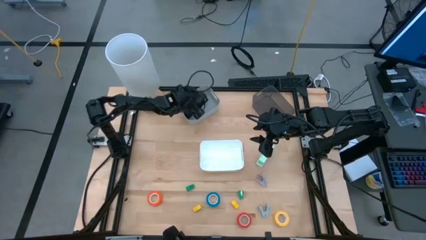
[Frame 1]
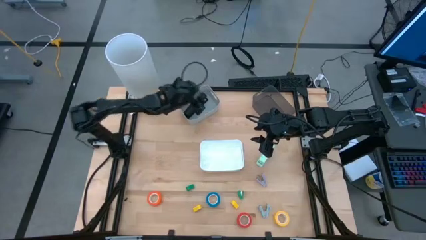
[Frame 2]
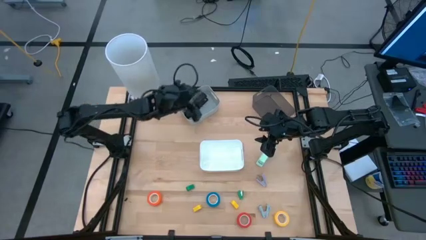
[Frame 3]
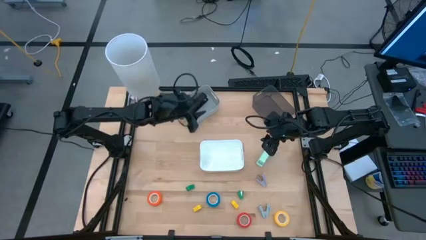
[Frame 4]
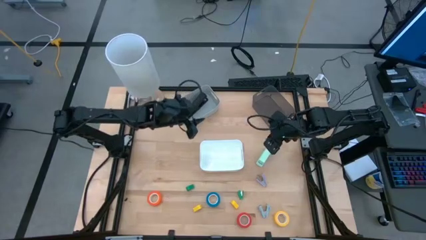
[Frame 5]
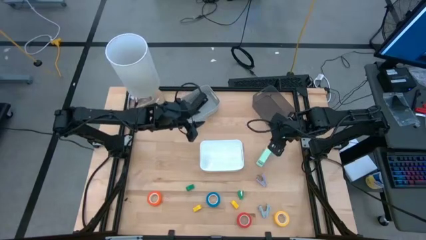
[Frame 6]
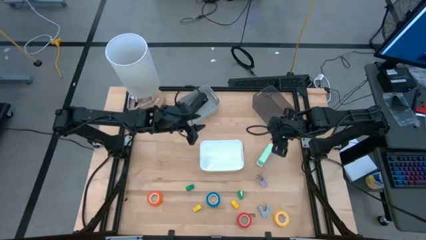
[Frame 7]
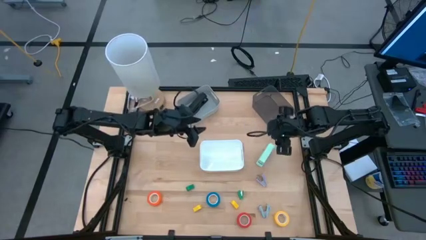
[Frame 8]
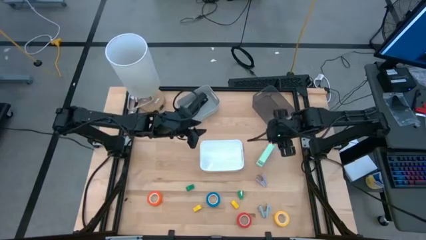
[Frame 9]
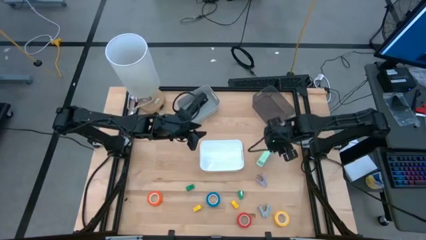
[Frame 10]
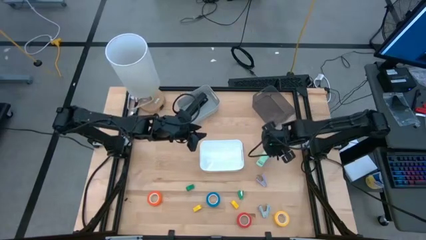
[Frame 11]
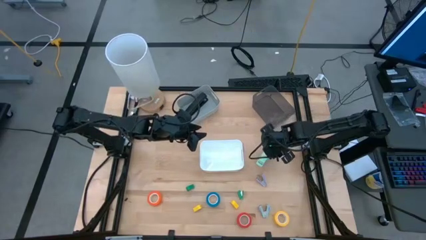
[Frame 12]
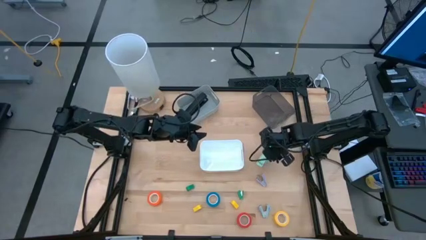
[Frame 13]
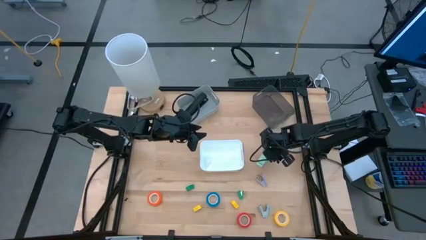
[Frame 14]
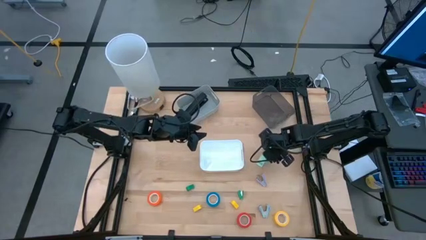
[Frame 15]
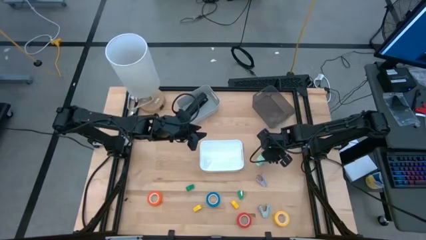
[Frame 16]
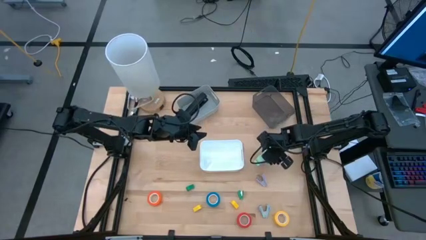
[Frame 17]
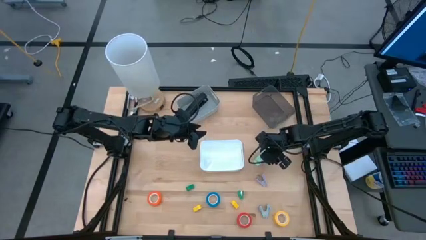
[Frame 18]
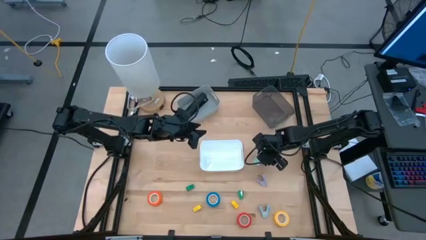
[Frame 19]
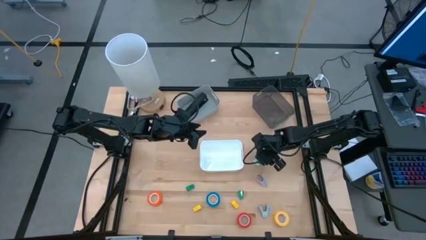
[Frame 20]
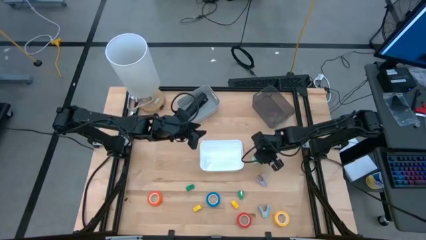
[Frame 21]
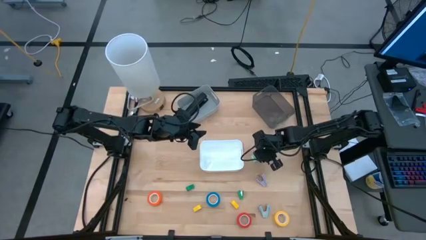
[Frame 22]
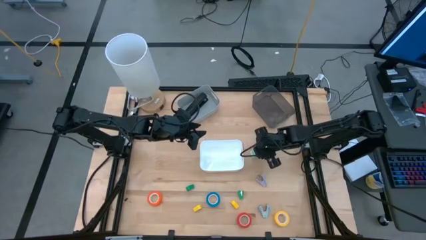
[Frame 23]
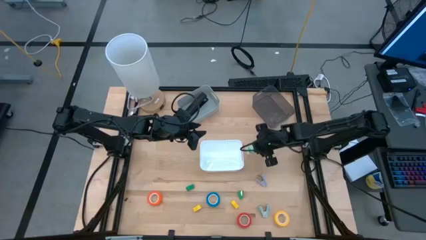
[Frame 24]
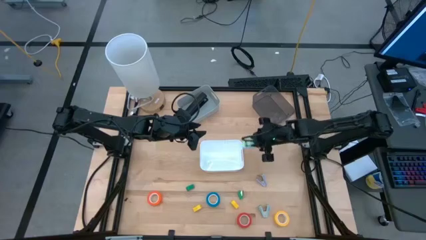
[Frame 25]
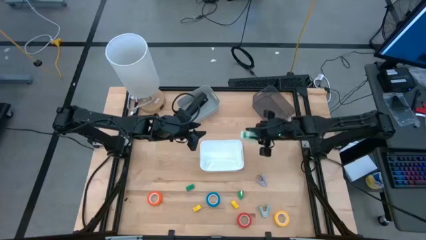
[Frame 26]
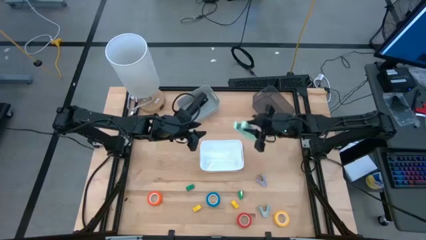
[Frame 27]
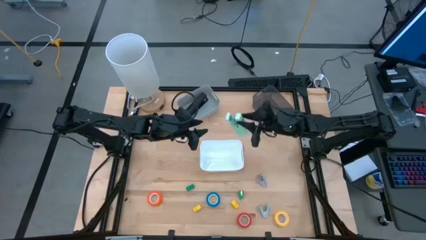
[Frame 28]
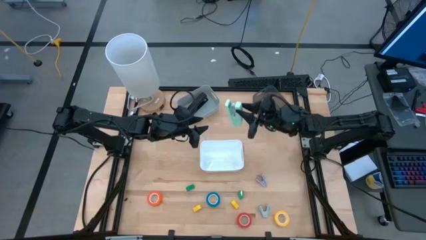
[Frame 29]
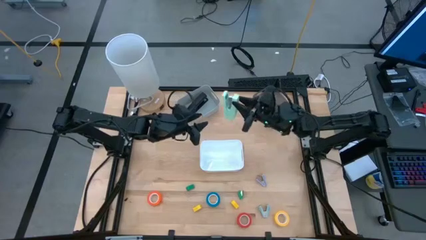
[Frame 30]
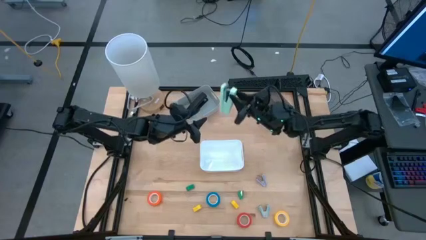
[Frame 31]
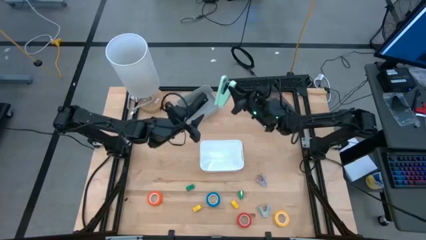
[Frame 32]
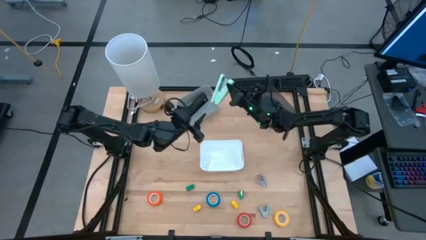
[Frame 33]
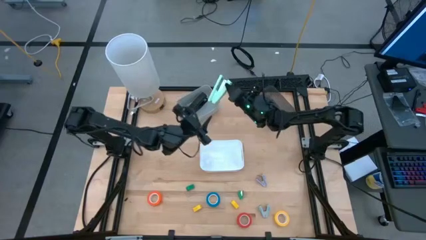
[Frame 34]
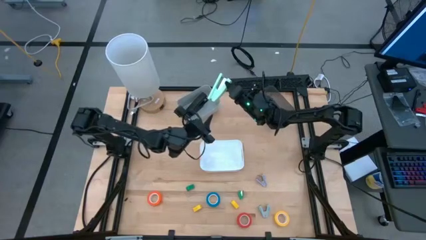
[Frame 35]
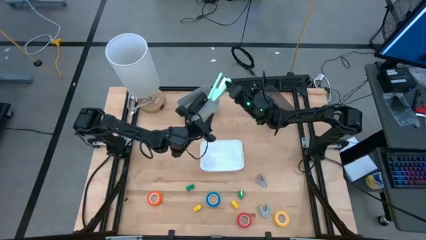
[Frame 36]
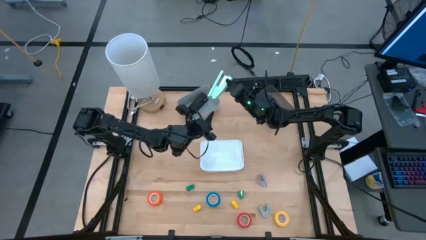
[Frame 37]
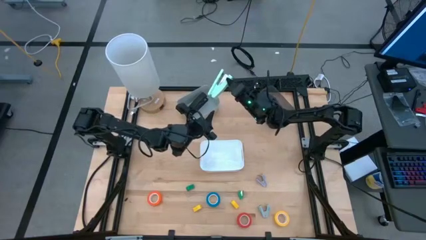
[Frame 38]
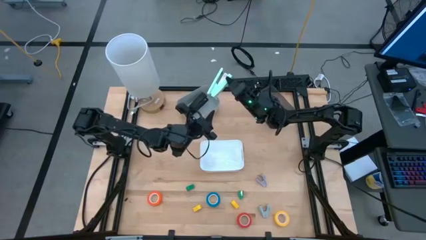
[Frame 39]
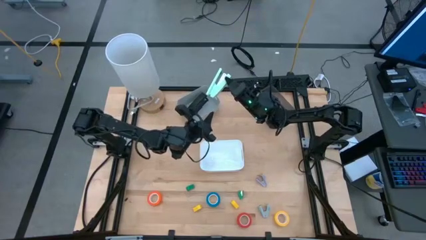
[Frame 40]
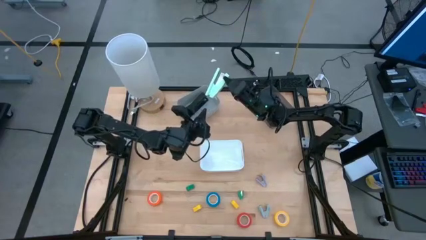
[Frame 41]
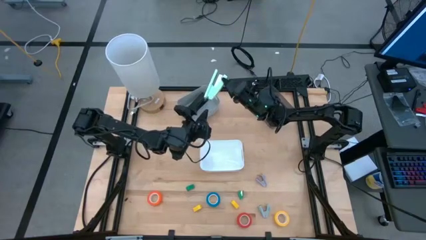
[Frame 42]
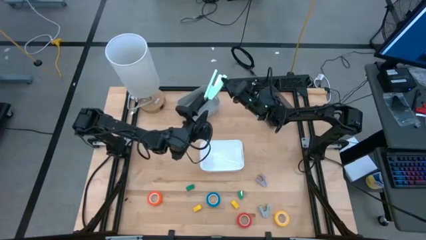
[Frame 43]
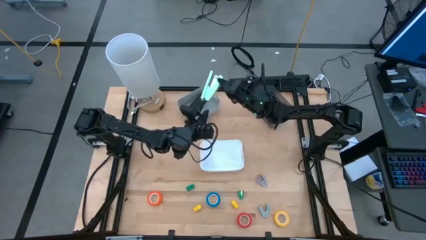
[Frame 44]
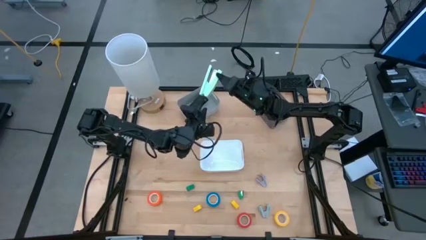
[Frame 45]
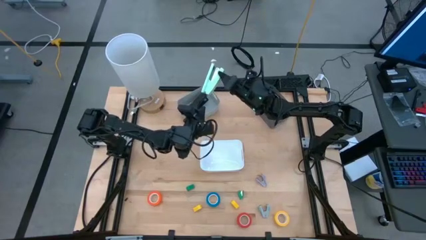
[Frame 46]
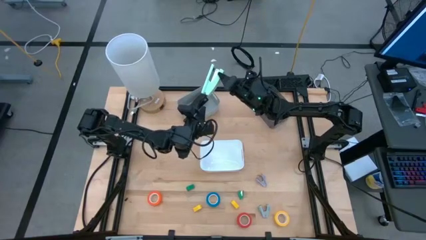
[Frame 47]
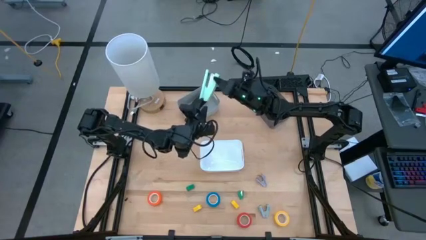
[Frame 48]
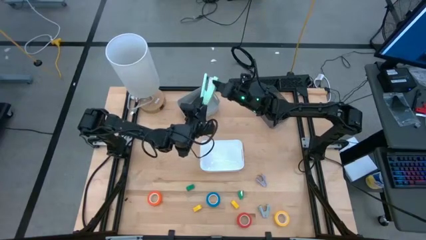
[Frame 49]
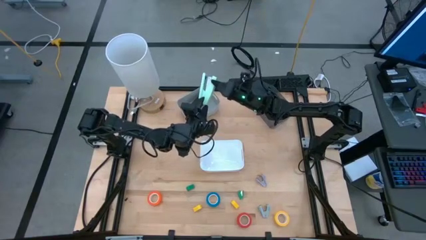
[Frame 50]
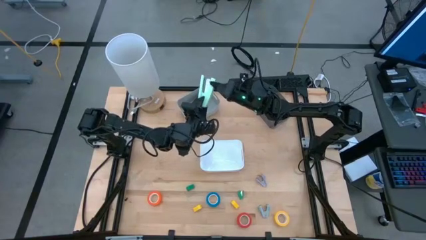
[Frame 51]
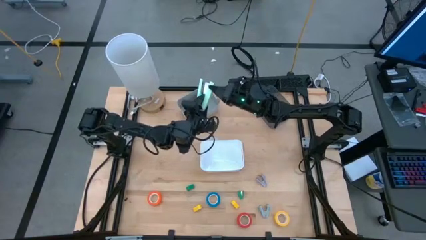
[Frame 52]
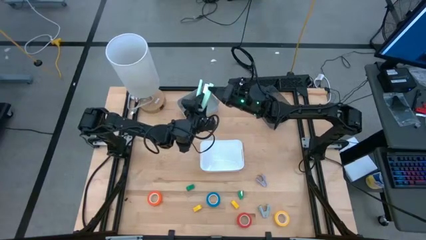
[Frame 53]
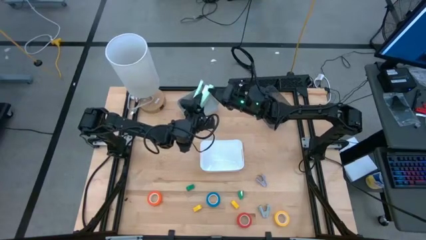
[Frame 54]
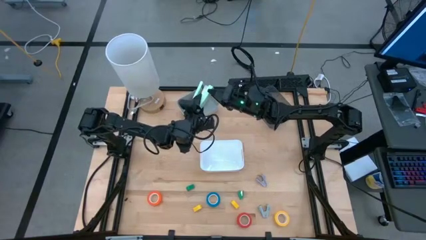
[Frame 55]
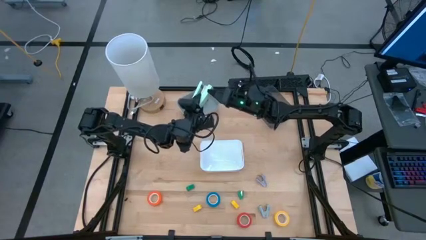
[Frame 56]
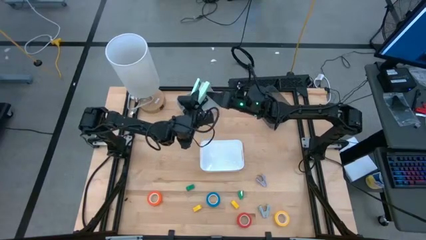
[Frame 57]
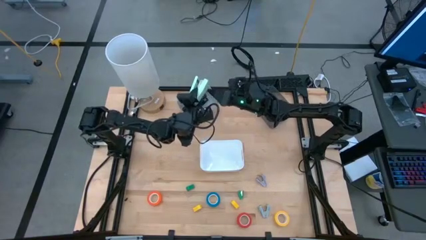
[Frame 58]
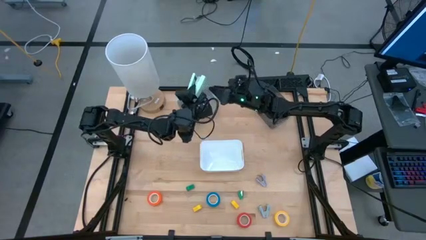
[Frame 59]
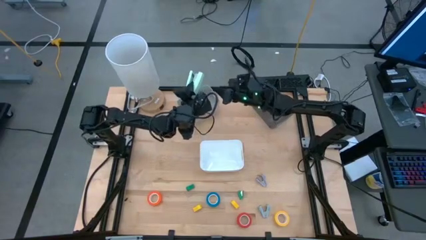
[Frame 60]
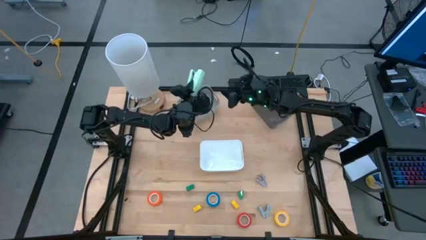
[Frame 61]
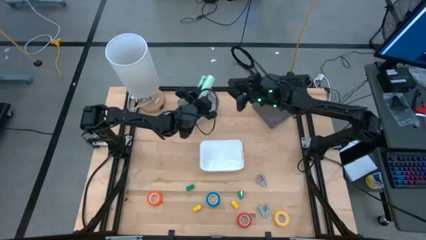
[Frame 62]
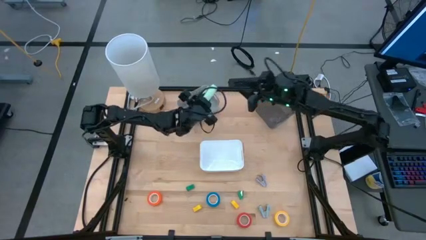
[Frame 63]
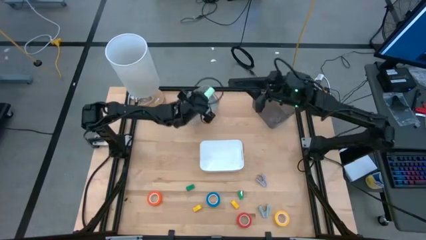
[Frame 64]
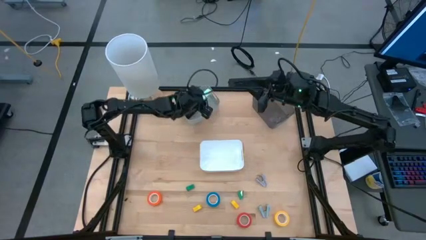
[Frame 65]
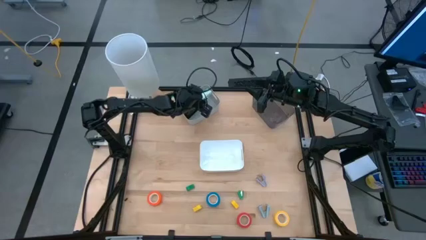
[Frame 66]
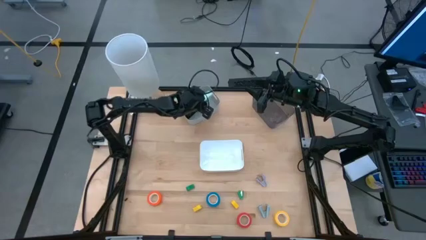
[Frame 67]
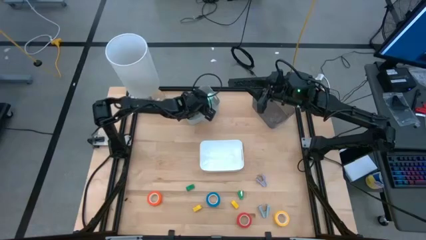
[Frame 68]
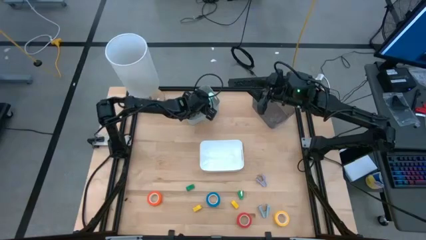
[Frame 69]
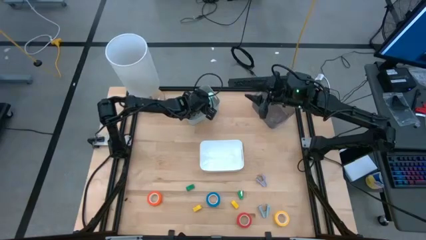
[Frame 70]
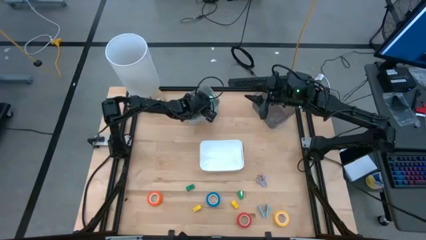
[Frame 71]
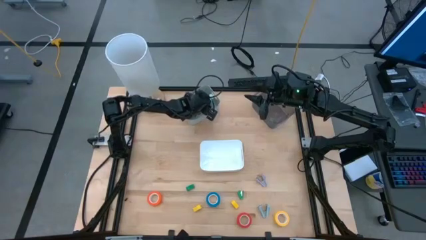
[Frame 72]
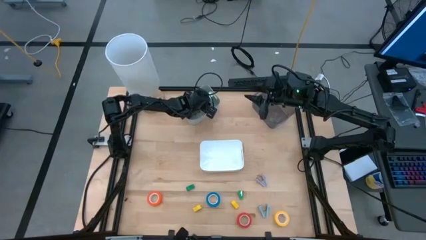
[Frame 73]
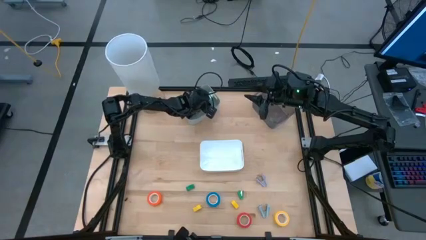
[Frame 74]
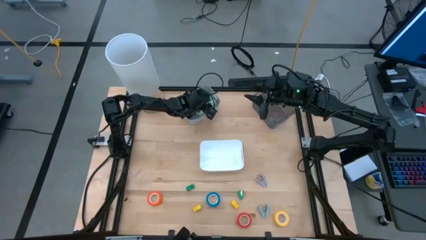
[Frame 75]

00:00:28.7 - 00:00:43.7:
Task: Pick and place Stapler, Stapler remover, tape
Put the light blue stapler into the gray bin
